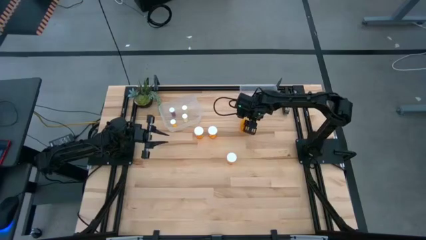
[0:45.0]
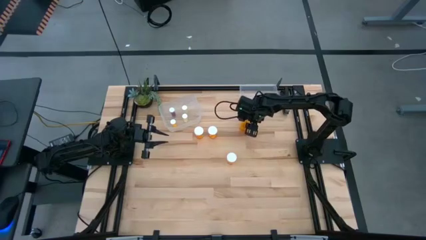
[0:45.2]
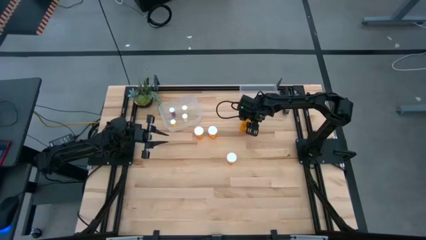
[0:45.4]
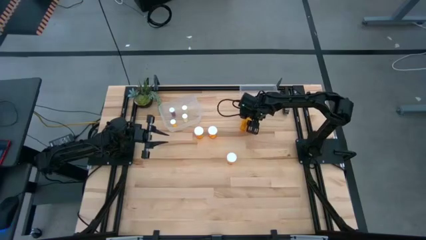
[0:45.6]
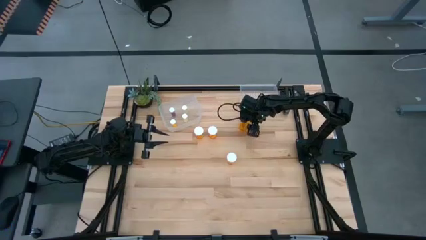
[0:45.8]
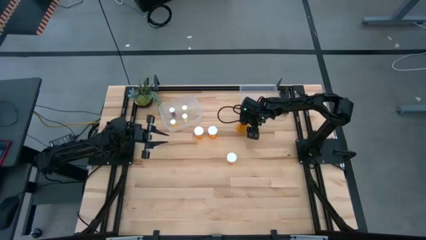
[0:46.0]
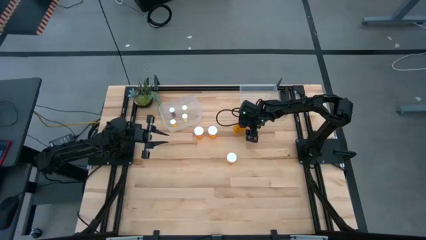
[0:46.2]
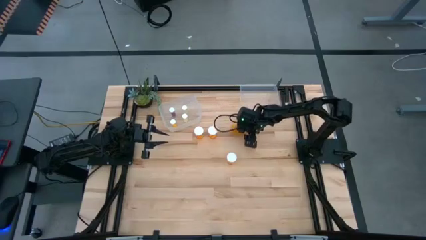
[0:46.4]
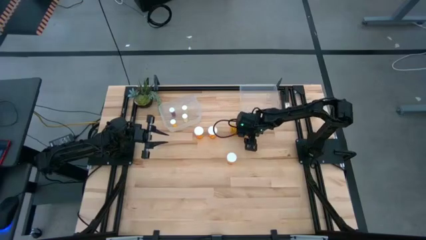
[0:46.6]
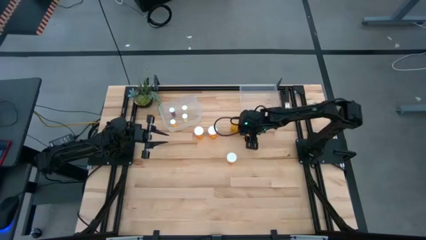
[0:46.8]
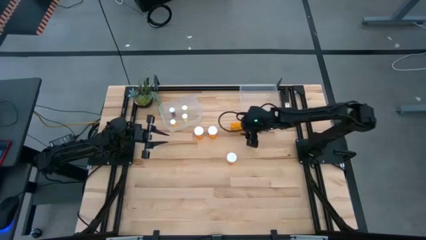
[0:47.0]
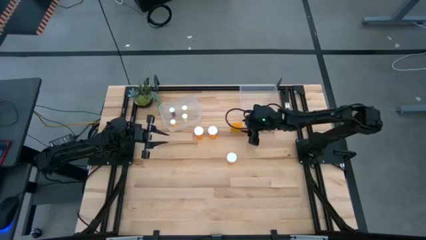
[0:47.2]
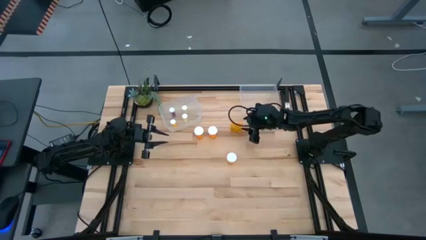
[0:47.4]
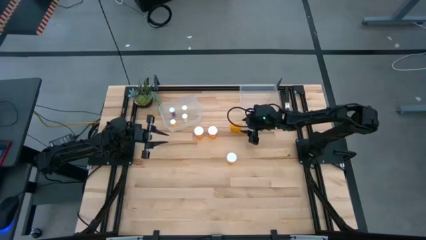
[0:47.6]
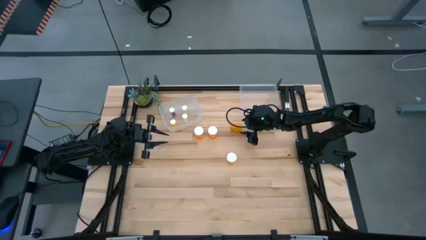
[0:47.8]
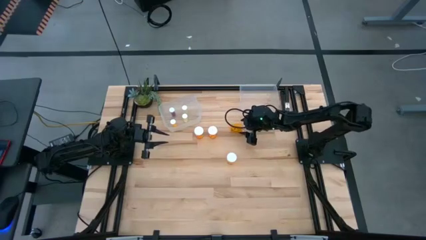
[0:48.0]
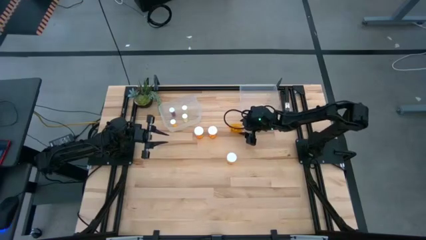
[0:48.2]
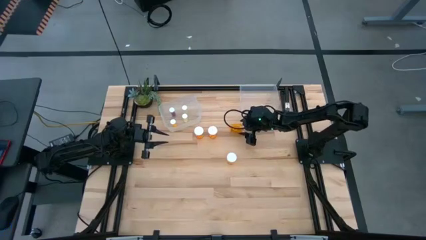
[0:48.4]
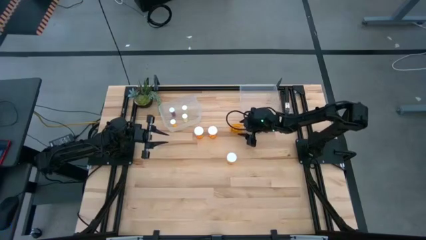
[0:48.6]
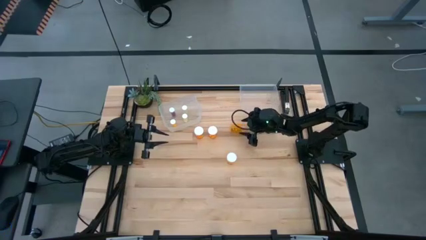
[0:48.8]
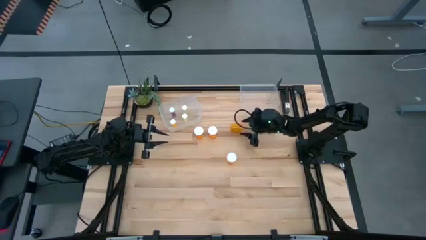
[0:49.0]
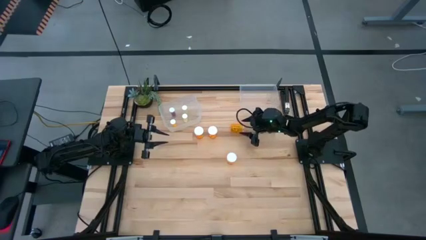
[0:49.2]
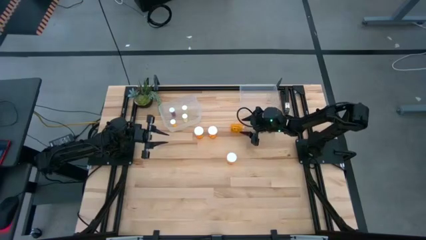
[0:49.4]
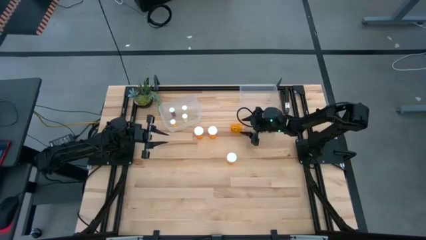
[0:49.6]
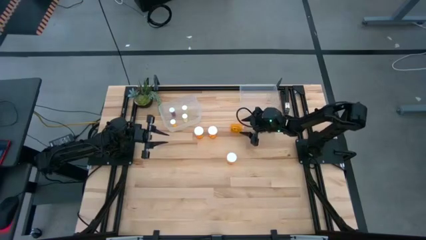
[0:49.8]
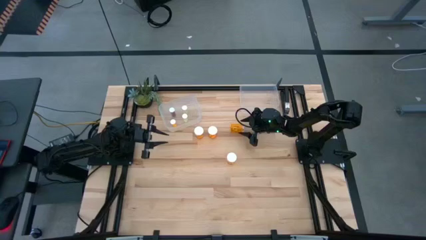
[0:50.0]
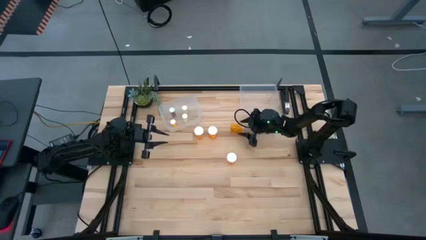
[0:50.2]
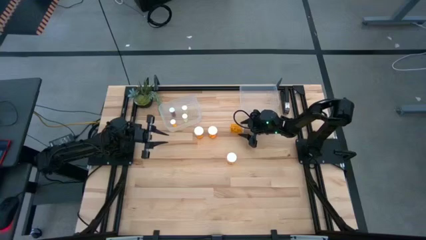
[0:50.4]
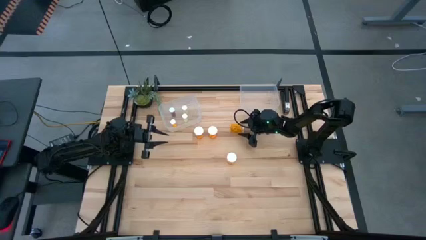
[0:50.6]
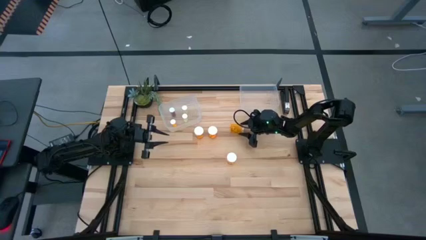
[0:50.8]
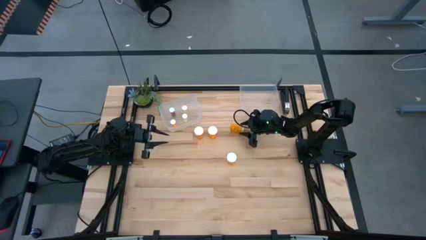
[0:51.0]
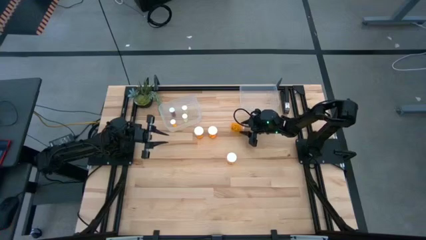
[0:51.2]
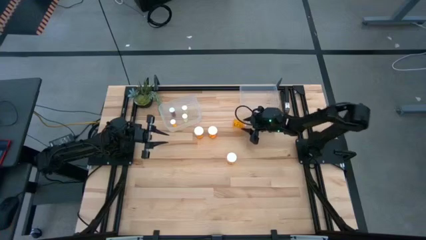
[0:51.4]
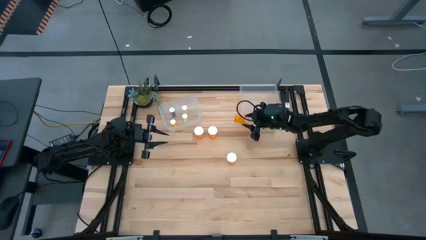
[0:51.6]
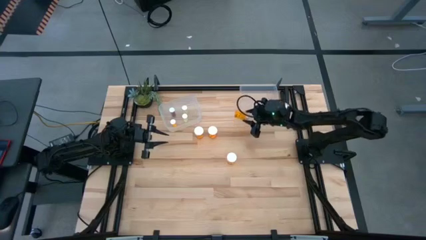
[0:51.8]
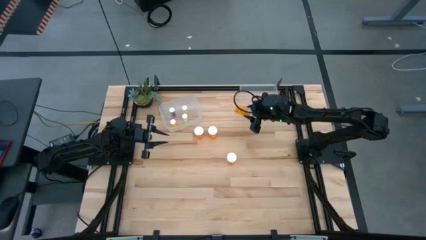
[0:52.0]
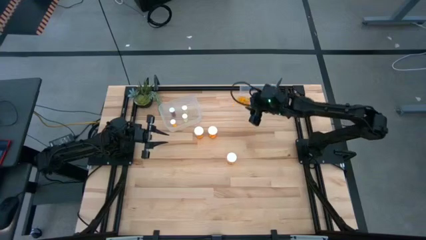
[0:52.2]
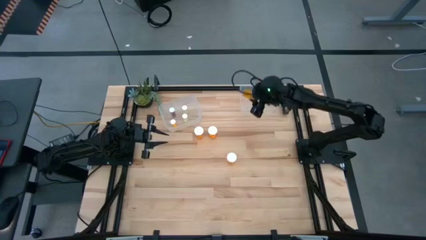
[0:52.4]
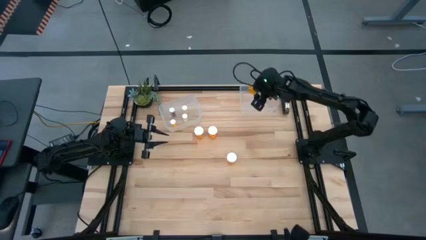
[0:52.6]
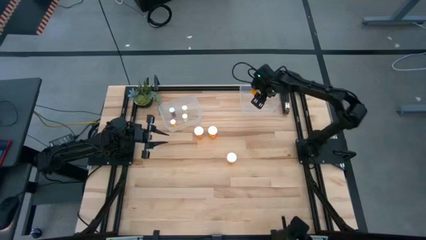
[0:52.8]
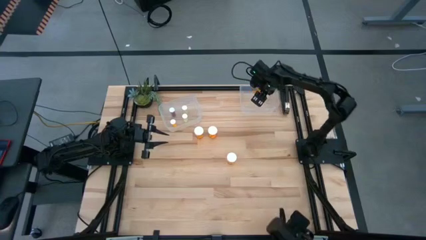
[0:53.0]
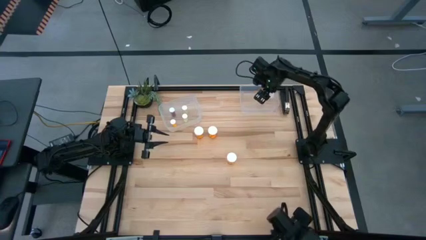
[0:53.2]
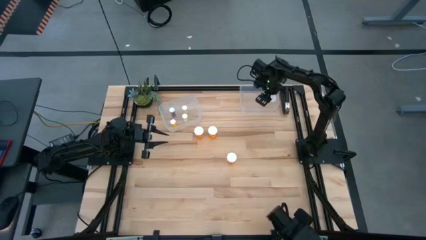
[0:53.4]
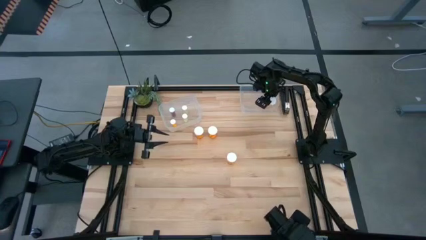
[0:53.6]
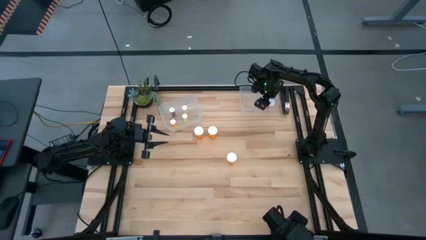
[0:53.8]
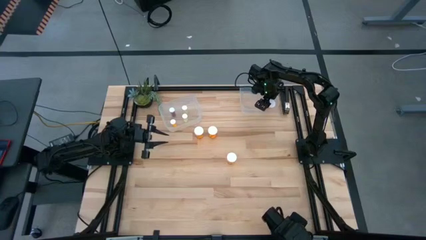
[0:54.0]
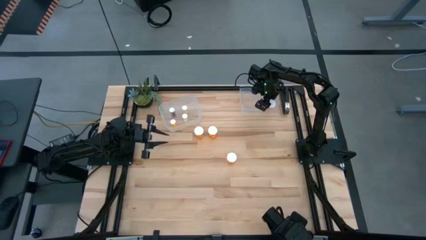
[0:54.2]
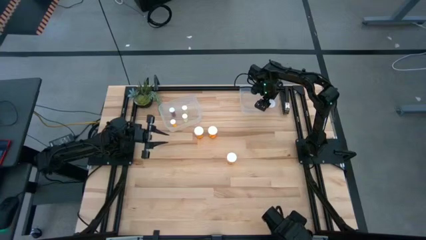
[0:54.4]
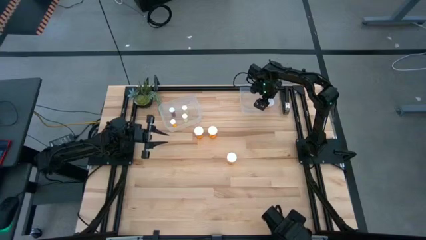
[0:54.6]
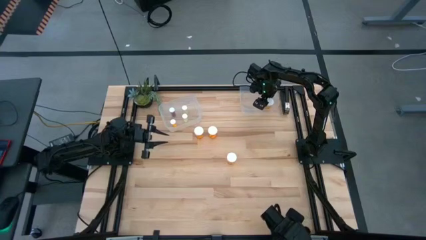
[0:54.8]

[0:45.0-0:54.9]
Task: Pick and place medicine bottles into bin by pill shape (circle, oval)
Put the orange large pill bottle into the right transparent bin

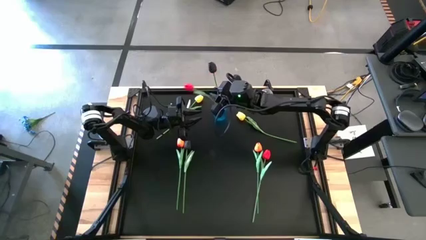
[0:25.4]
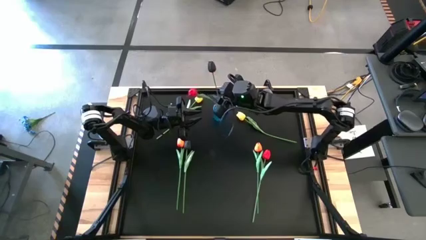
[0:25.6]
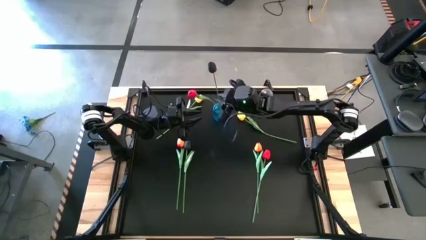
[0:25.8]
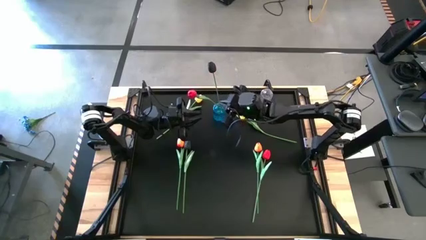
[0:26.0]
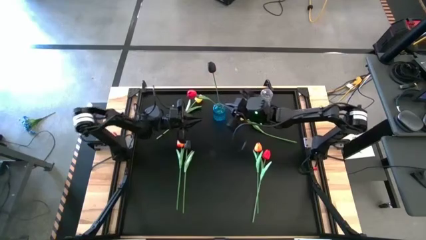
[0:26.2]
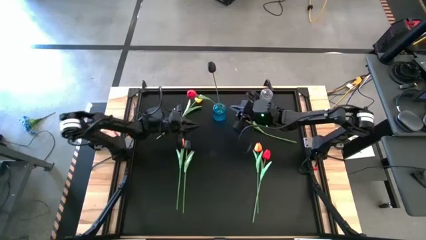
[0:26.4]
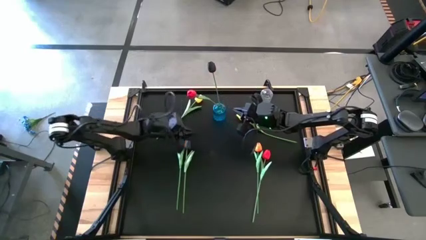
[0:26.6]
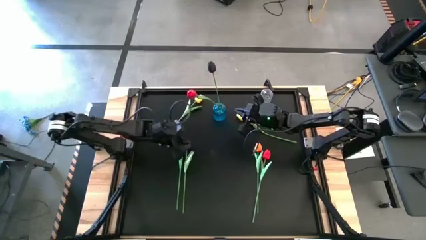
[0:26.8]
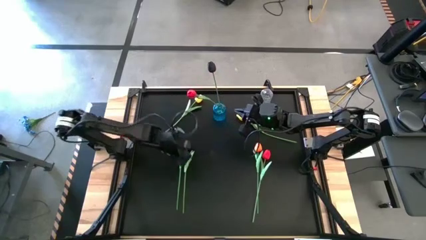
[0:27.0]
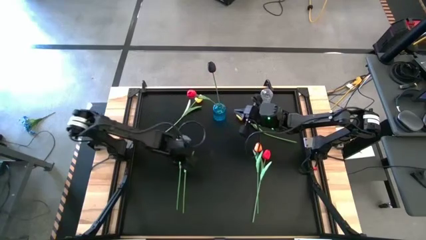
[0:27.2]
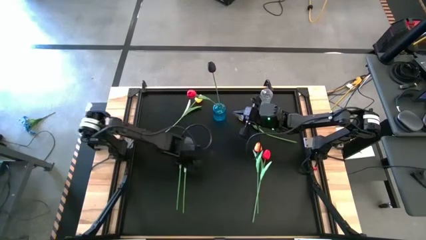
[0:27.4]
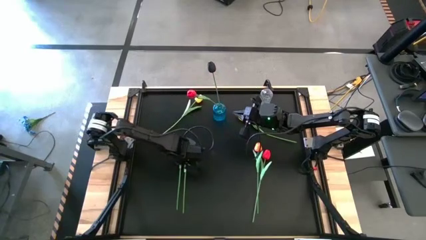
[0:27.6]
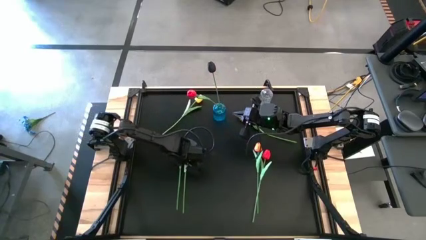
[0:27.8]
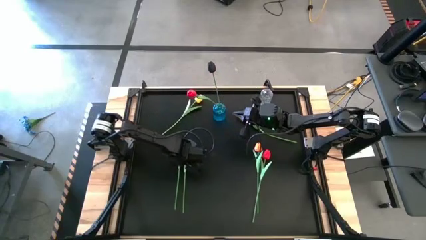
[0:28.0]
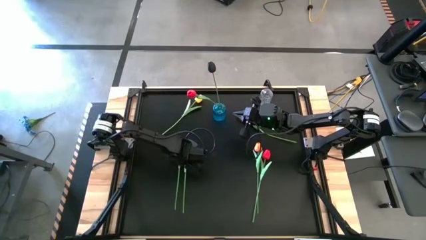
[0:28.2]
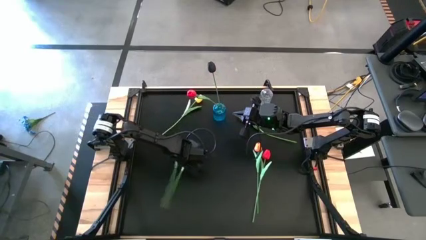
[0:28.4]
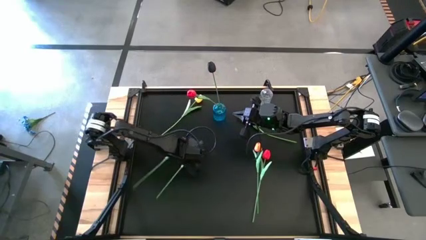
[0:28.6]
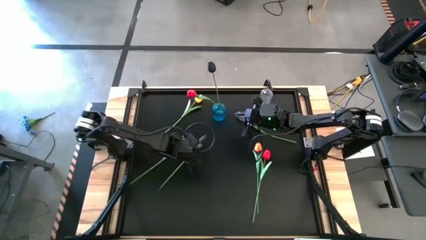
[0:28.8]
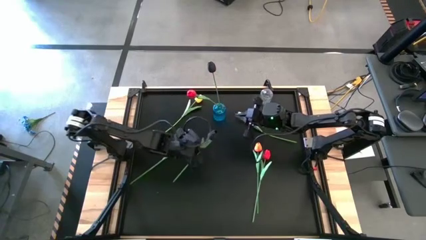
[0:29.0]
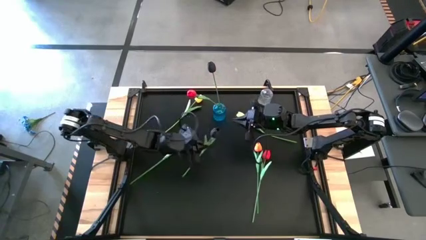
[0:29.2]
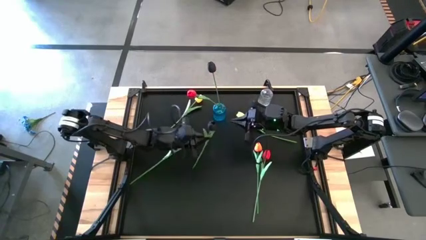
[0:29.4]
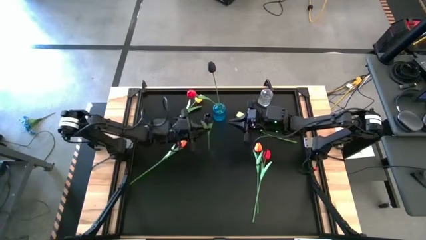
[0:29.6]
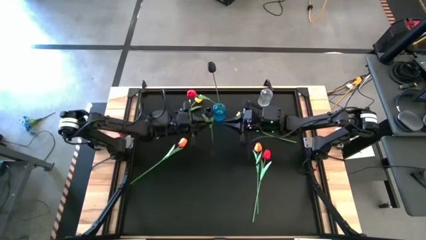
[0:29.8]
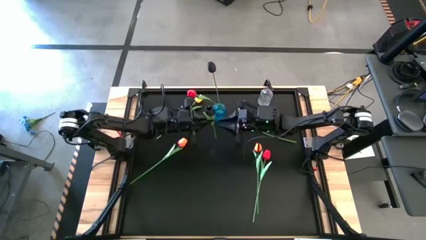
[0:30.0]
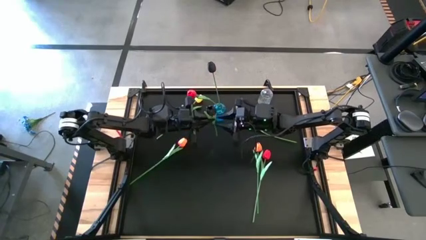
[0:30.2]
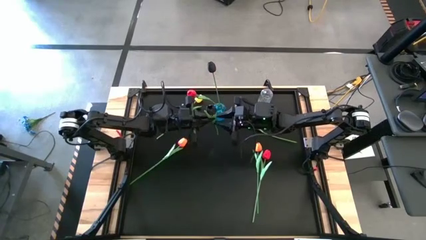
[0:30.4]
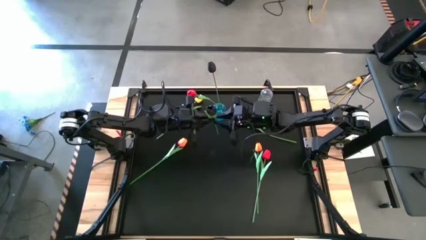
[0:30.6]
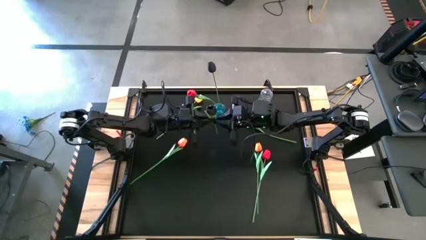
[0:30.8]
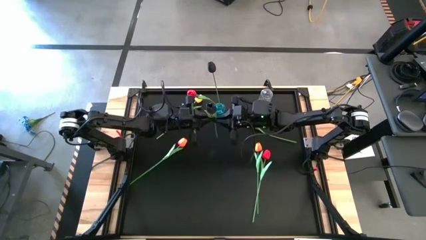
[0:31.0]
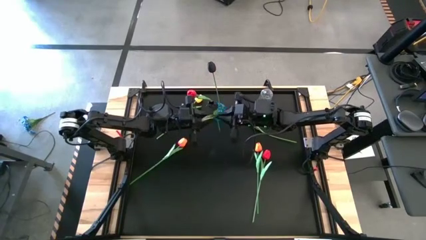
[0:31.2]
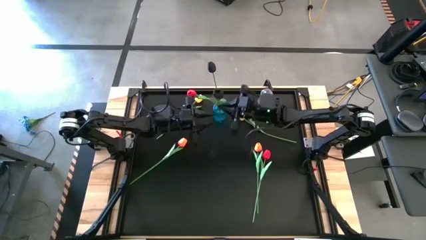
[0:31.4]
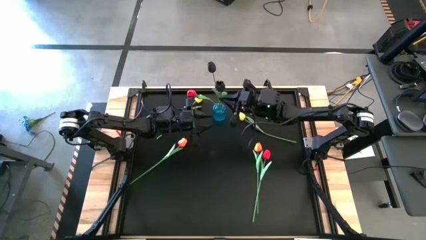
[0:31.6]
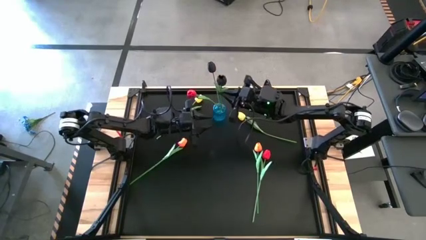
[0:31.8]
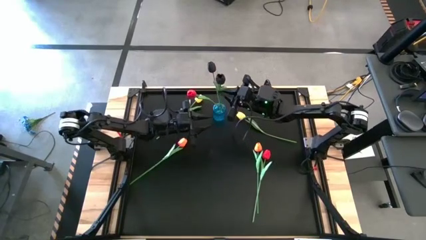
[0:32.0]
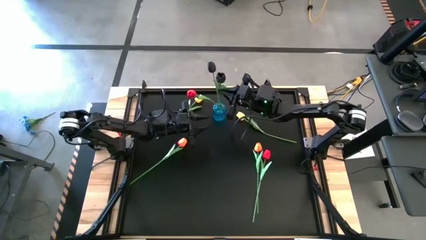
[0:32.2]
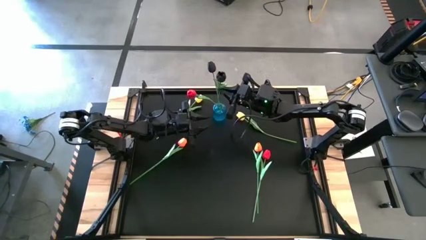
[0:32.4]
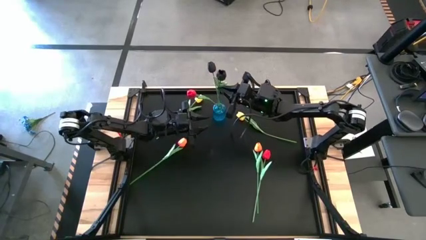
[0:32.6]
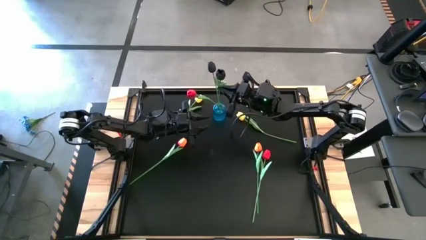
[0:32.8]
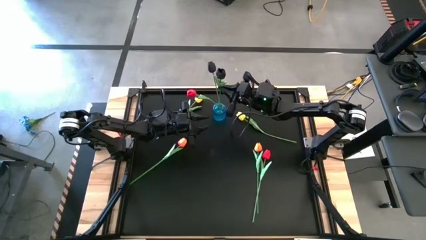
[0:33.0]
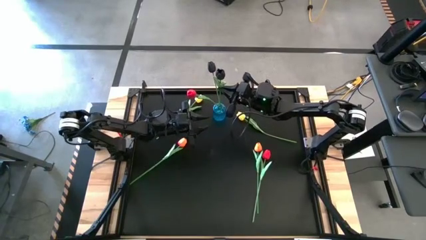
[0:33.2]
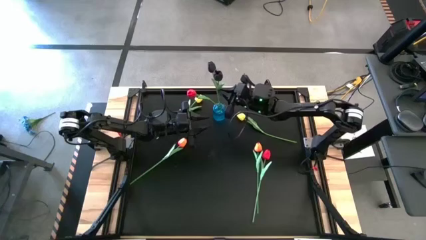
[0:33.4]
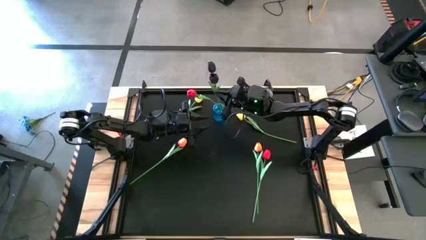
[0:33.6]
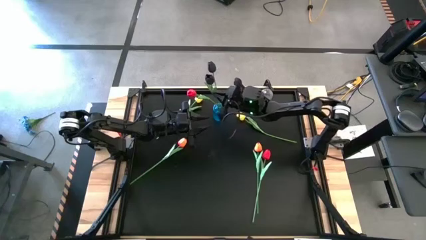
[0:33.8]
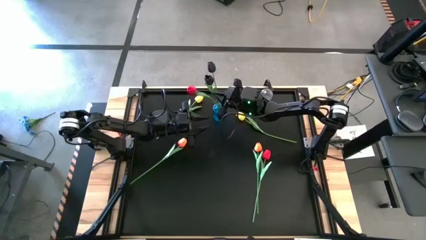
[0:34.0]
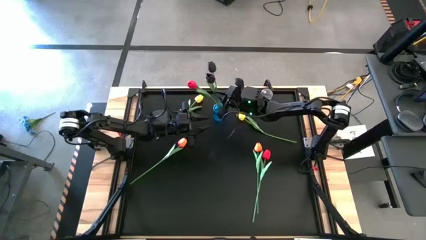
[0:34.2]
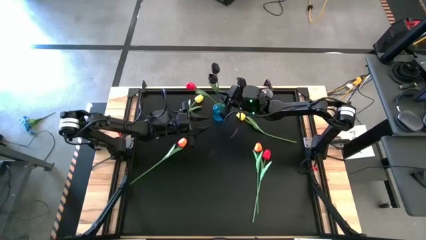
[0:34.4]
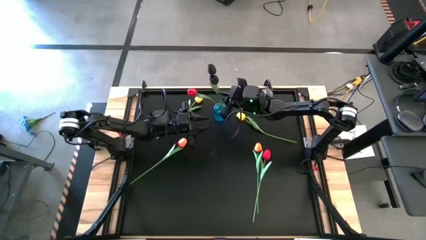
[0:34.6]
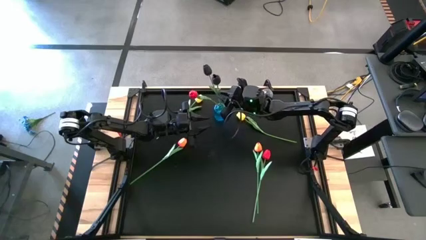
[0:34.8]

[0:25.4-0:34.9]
Task: Sort flowers into vase by color
Put the black flower into the transparent blue vase
